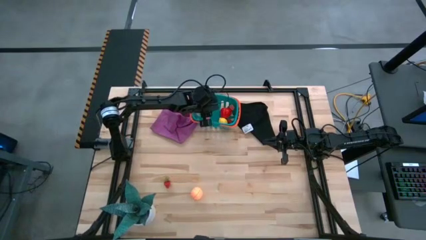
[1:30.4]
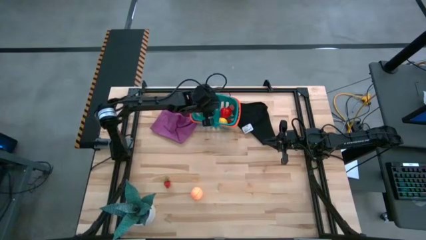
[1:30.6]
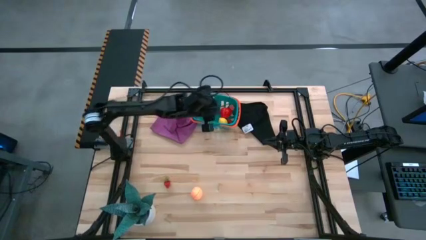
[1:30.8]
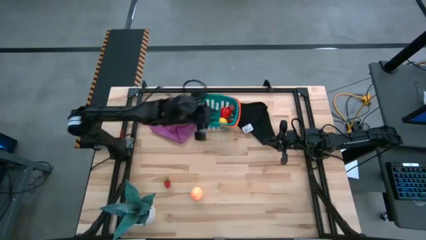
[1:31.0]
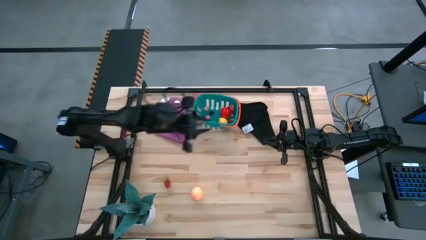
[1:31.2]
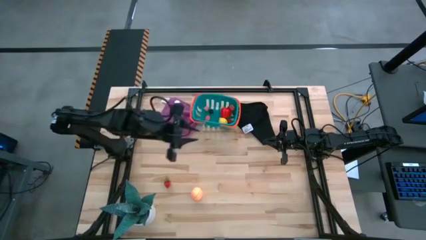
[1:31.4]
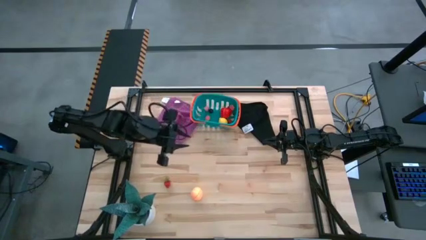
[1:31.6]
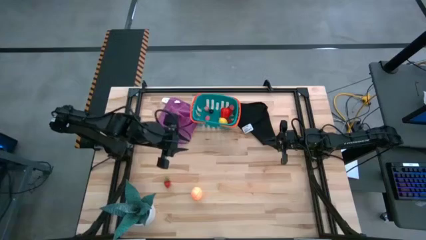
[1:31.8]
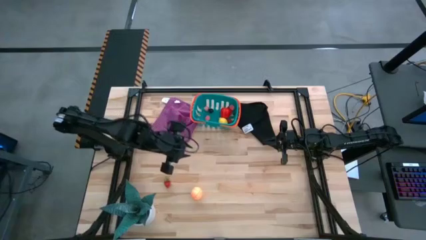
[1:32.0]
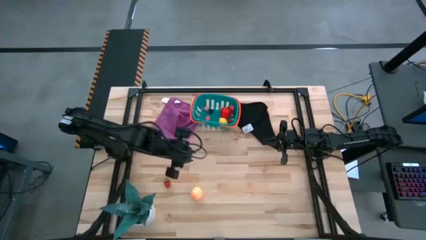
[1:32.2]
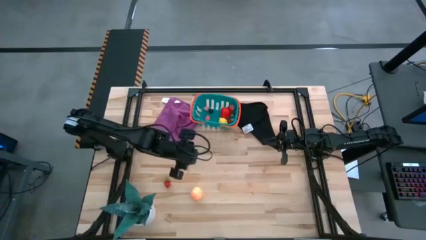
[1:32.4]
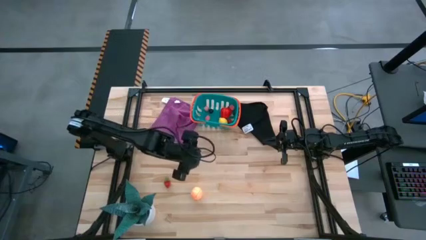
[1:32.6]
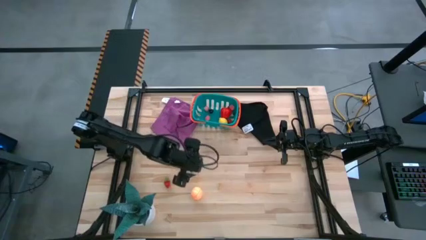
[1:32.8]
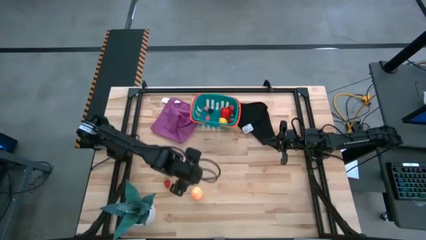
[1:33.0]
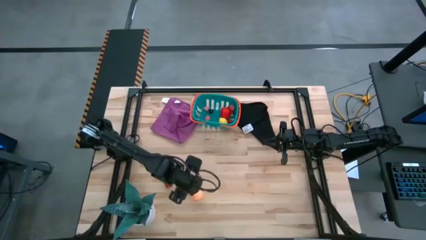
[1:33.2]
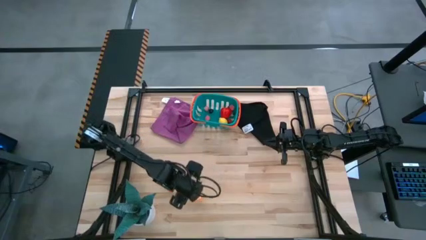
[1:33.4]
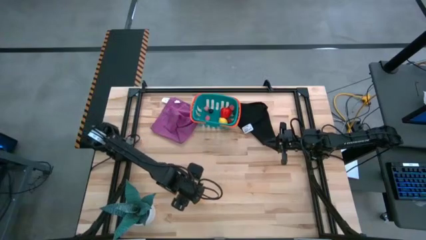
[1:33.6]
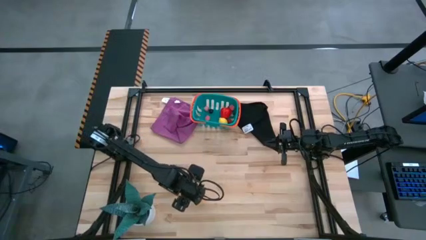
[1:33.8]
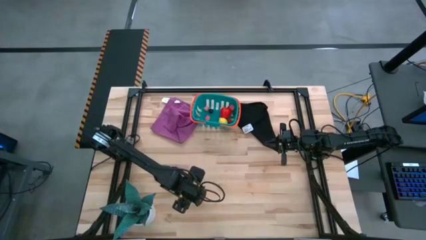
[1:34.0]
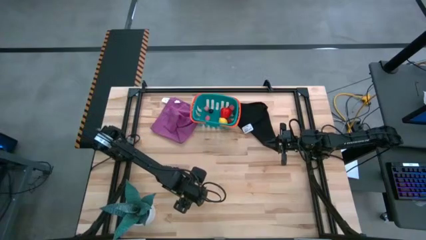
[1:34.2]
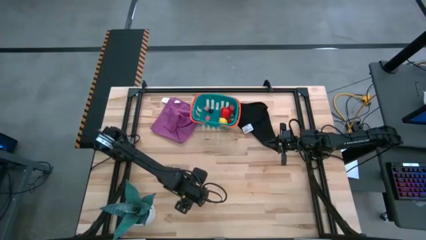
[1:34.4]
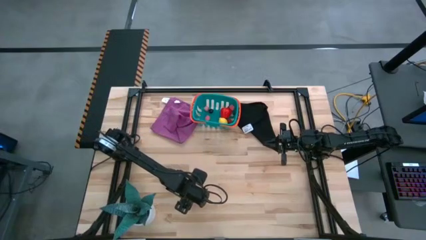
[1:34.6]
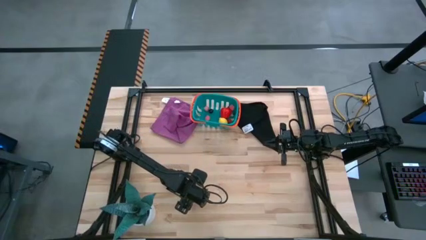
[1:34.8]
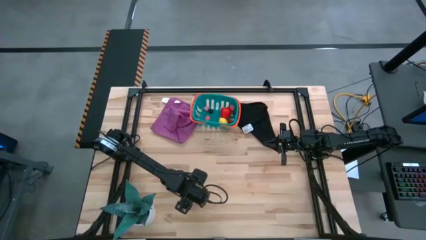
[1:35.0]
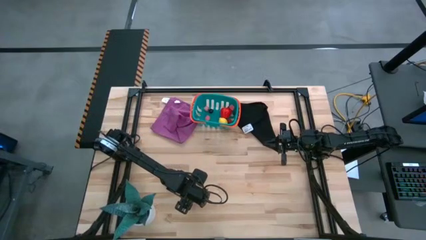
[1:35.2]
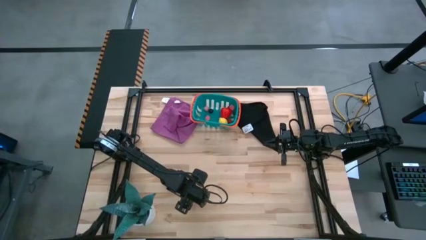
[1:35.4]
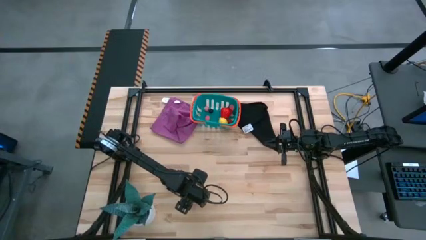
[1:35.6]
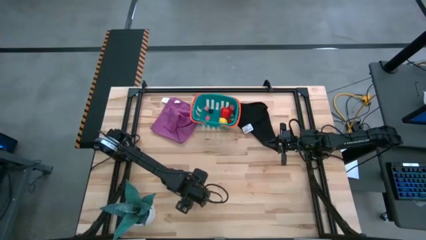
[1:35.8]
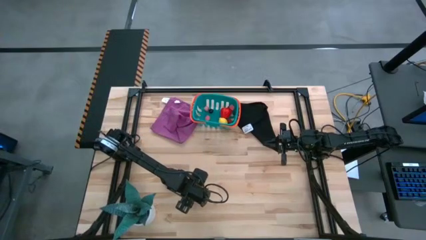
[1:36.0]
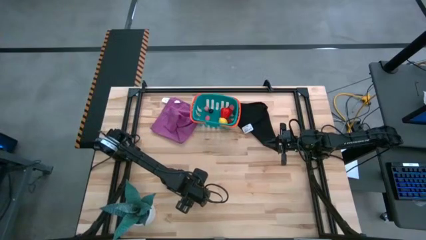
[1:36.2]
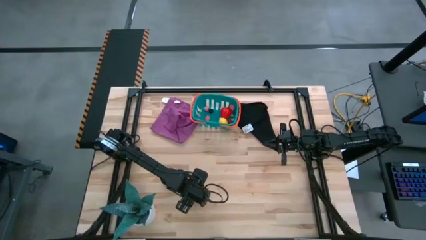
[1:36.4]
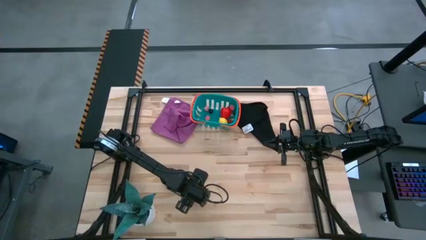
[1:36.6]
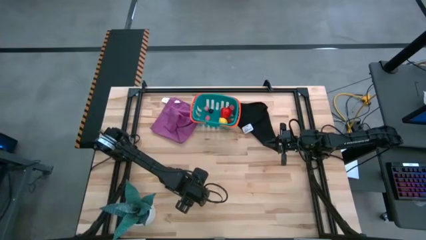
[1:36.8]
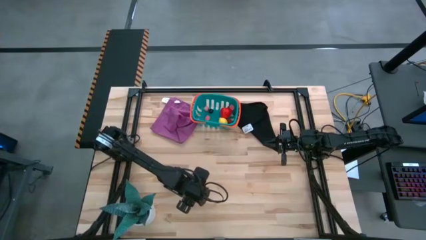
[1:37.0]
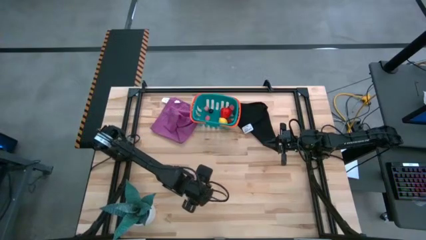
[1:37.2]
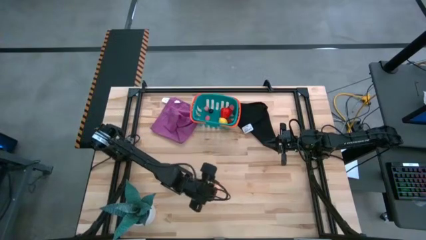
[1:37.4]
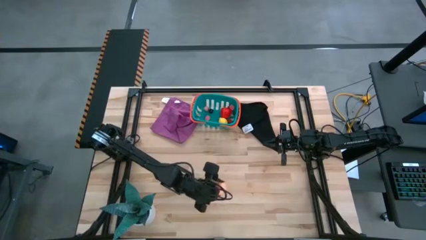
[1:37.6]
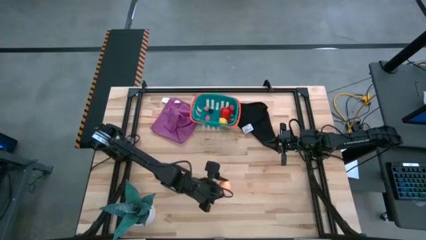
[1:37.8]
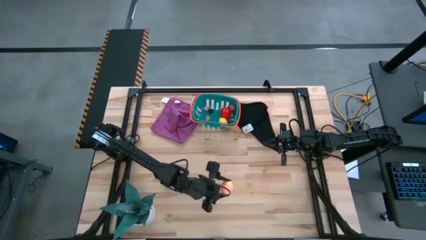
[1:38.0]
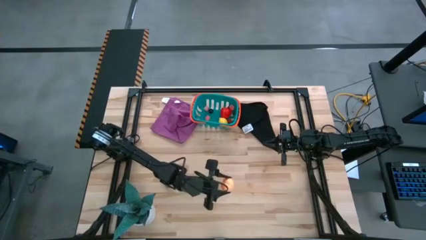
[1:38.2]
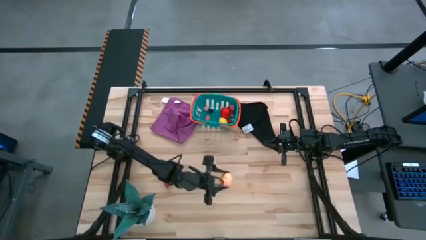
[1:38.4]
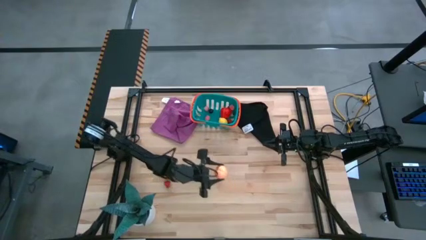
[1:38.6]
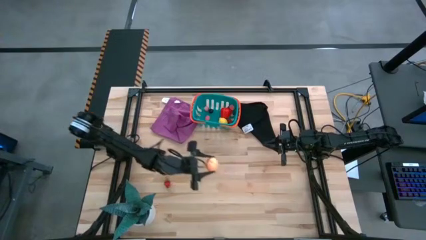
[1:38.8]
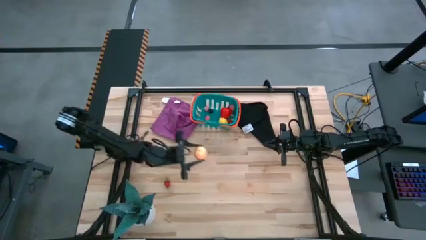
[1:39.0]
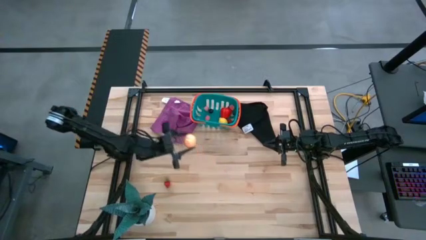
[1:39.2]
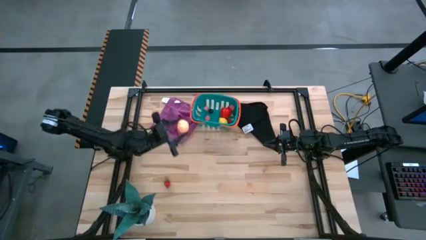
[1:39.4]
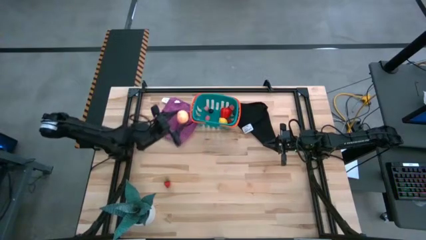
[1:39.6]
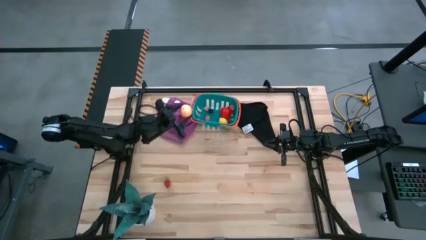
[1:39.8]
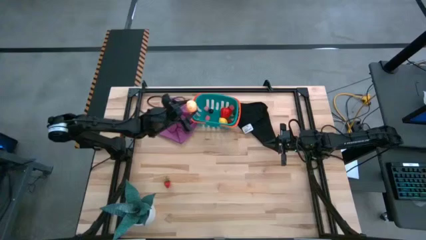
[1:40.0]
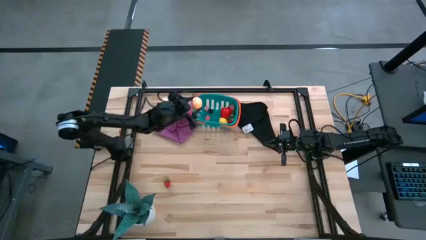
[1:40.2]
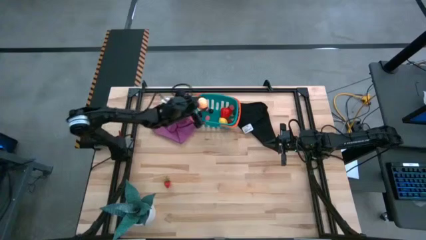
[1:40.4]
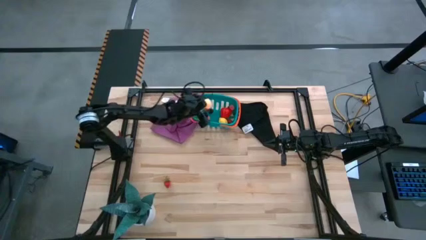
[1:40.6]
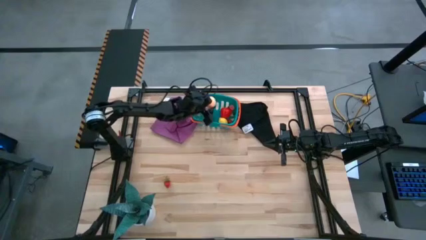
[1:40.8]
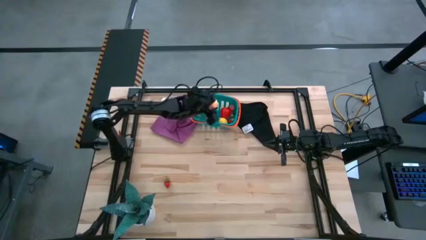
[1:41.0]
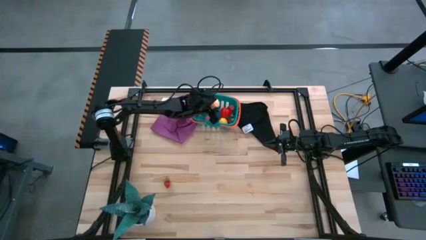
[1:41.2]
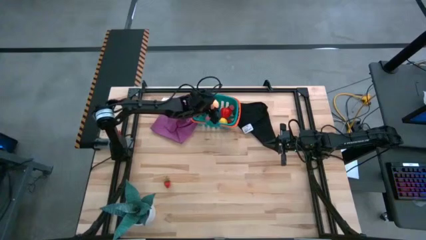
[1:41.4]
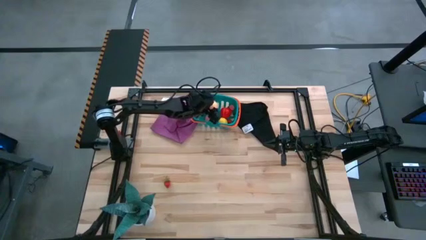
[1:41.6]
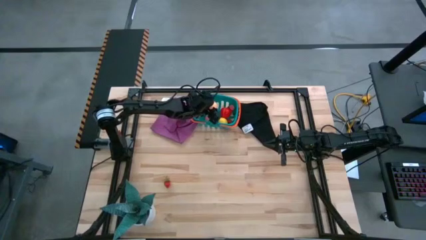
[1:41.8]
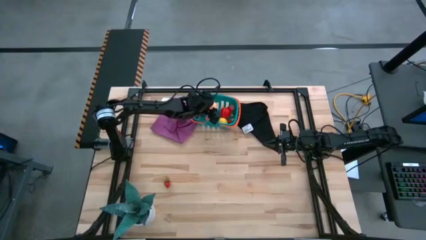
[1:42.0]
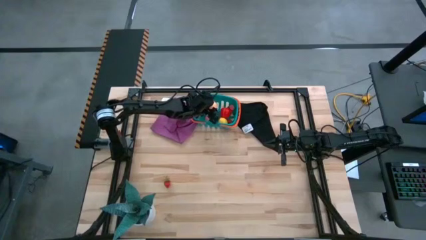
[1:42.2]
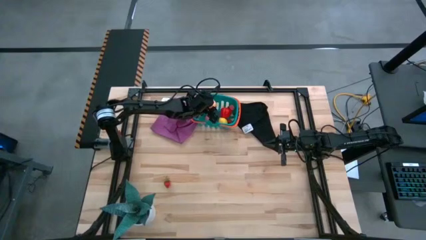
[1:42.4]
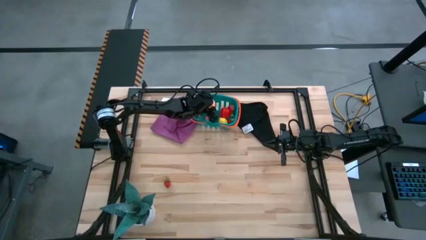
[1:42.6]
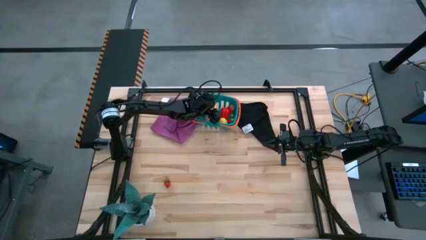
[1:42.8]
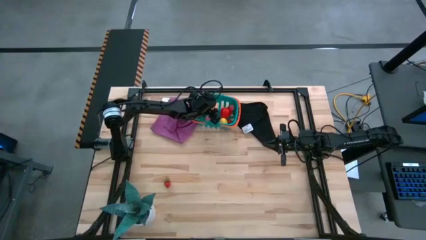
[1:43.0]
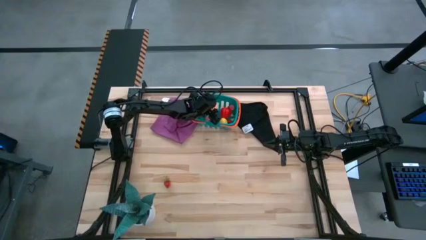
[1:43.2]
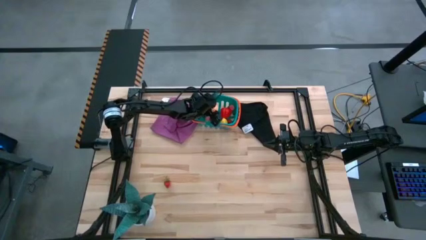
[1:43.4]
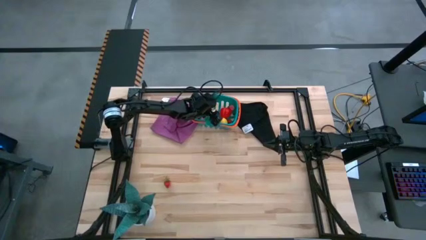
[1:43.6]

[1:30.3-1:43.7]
Task: Pick and placing Produce into tupperware
Put the light orange peach into the blue bin
